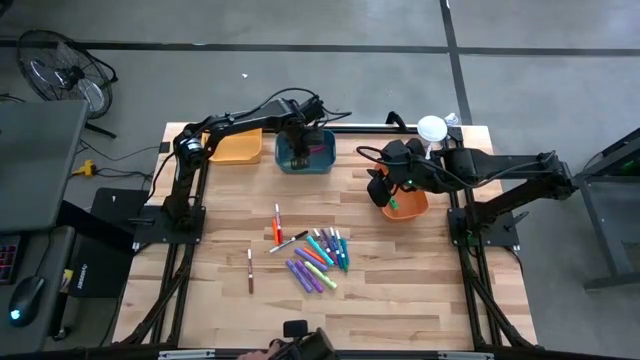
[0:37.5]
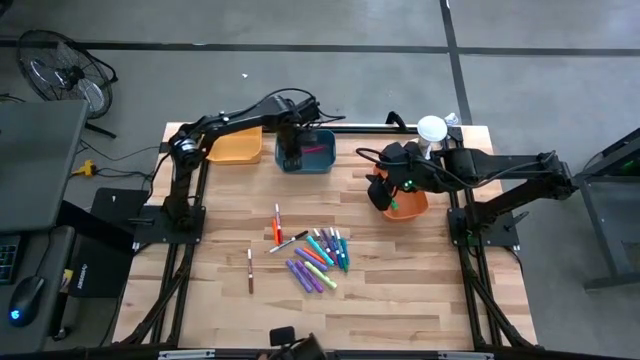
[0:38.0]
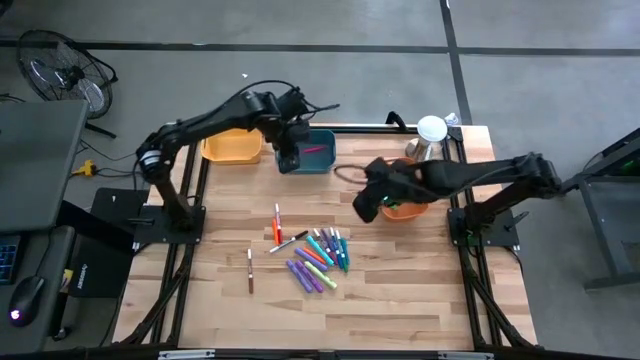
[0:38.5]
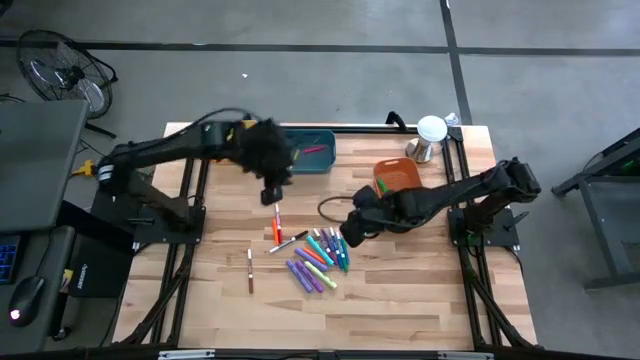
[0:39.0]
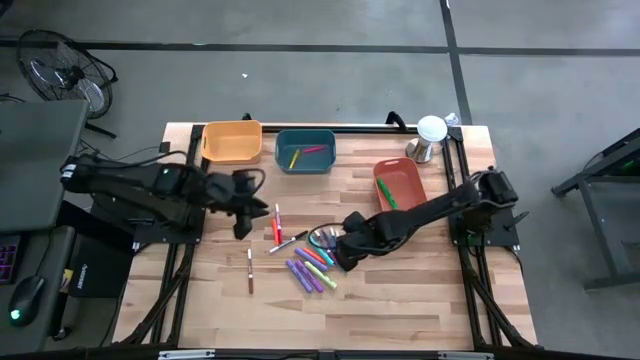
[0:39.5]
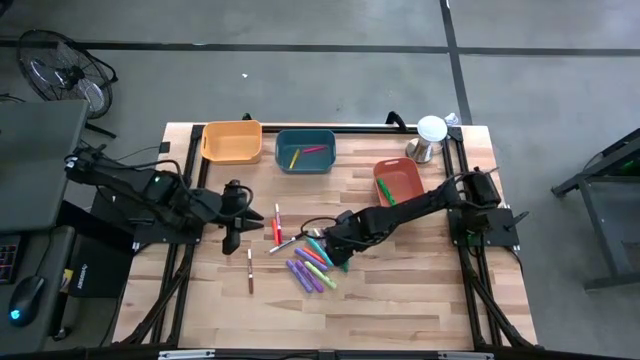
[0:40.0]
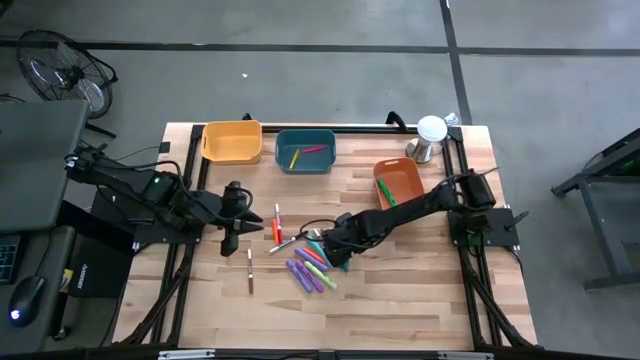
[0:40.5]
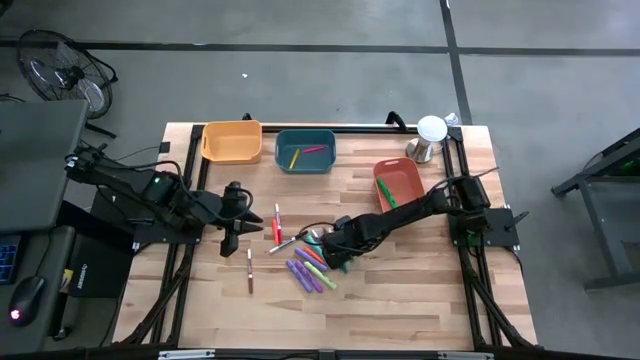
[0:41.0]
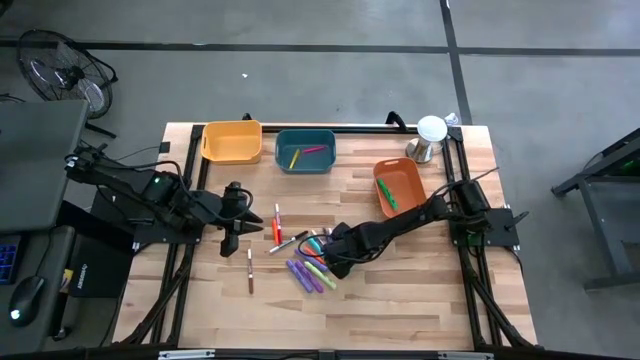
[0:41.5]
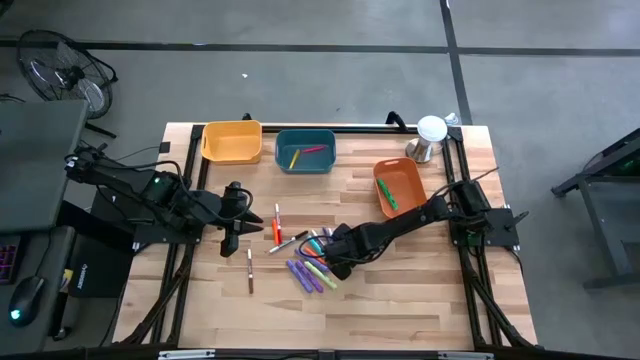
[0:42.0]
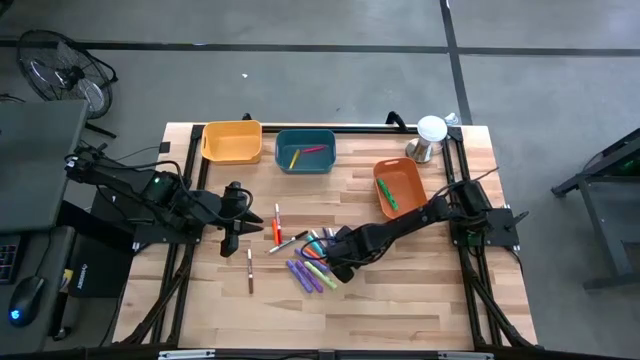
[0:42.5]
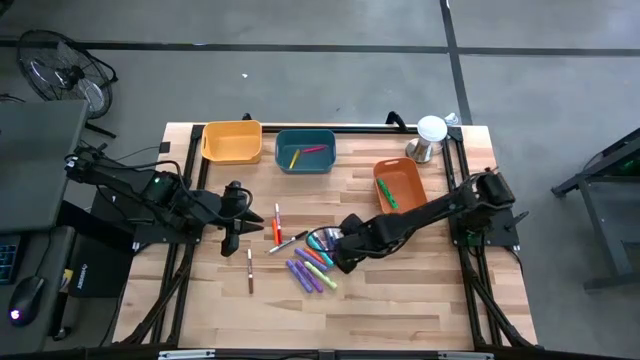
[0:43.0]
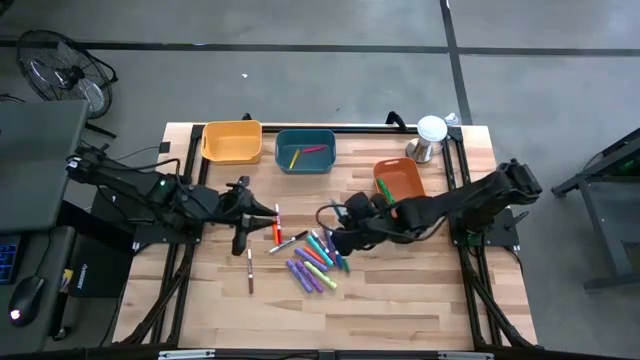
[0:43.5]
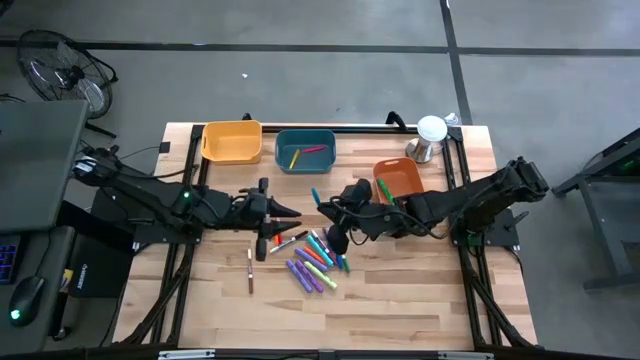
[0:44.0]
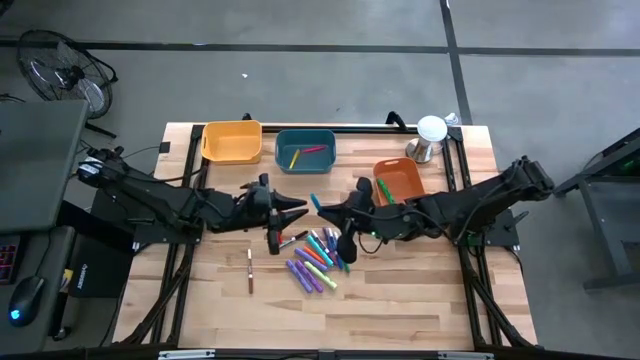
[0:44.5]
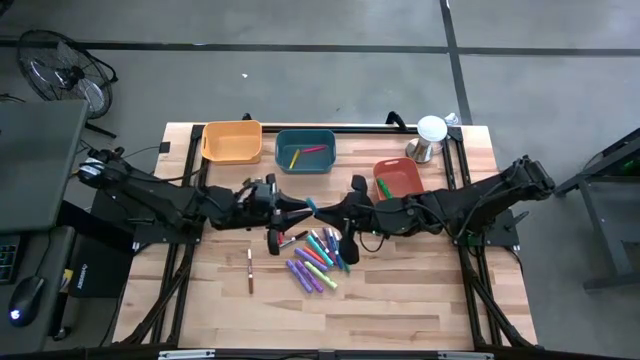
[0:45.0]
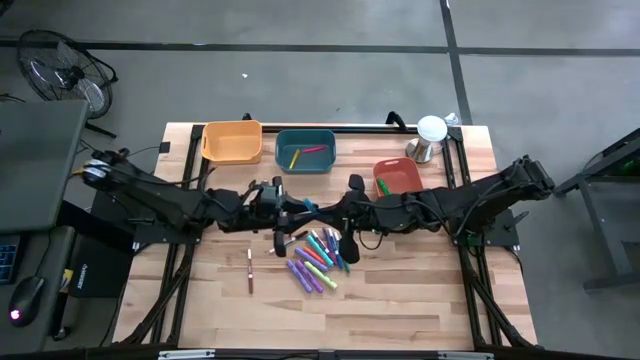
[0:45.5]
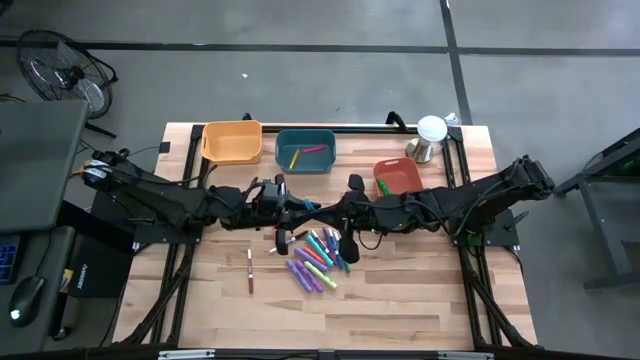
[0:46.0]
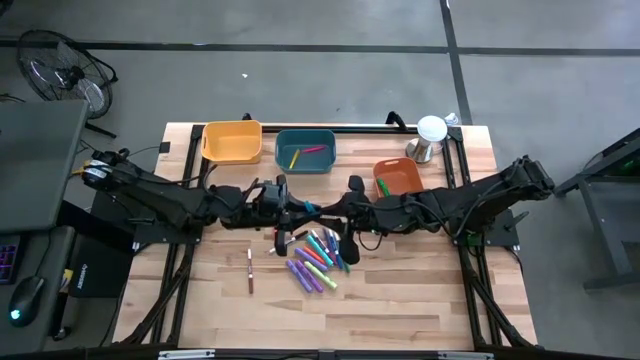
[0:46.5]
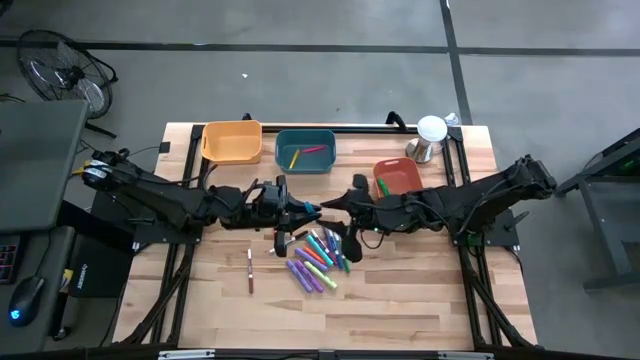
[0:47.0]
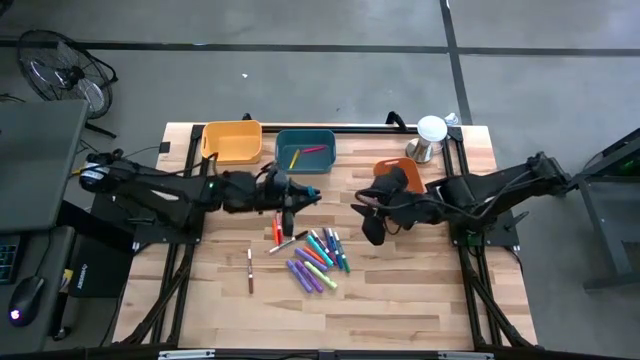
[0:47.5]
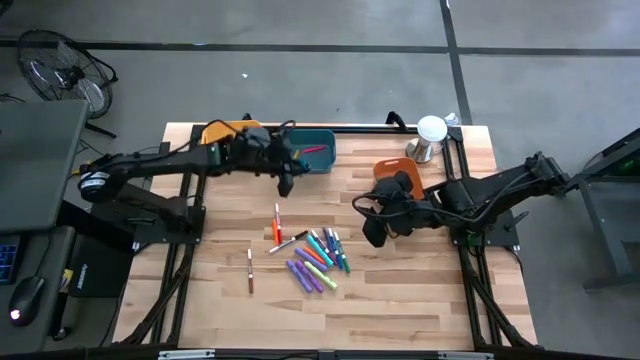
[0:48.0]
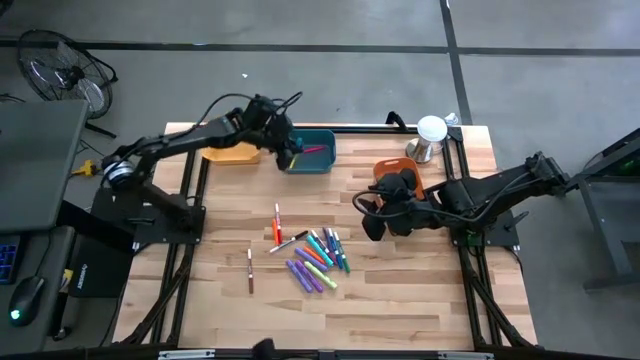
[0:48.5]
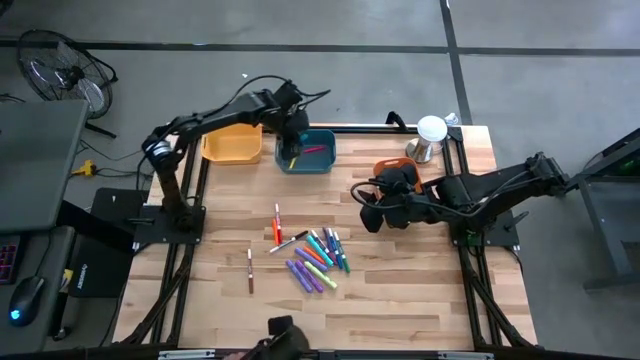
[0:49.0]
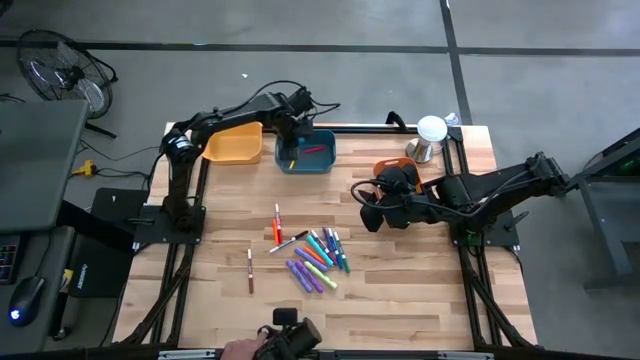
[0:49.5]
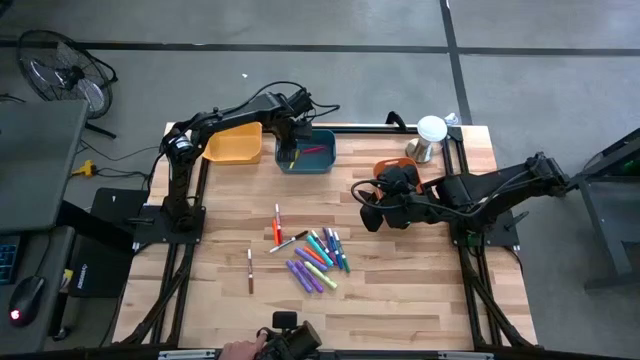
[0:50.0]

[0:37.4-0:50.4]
Task: Pick & Place Markers
Put the blue pen into the blue bin
